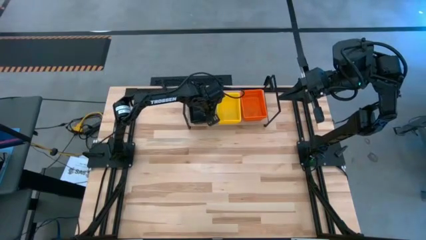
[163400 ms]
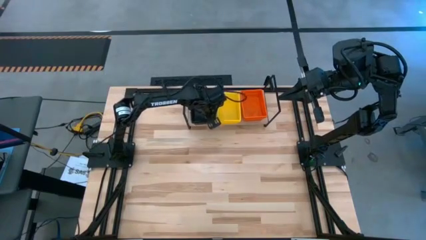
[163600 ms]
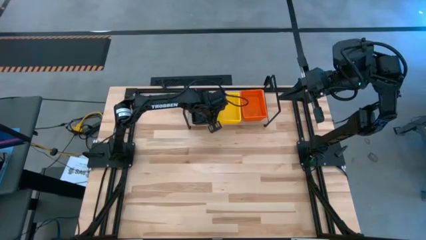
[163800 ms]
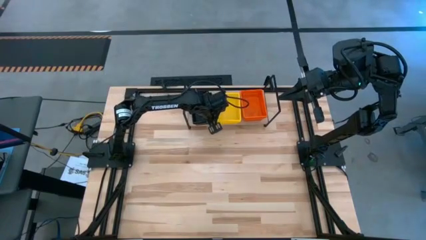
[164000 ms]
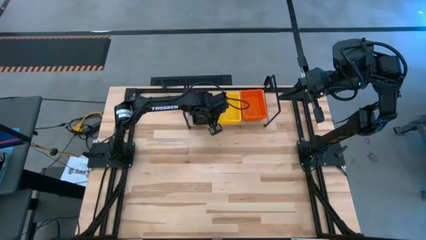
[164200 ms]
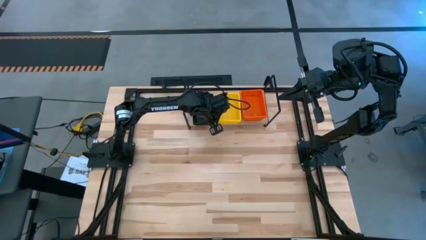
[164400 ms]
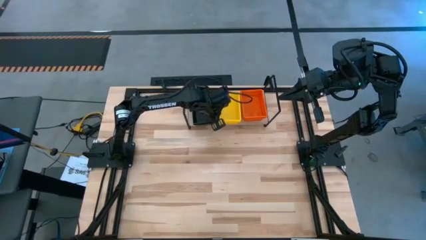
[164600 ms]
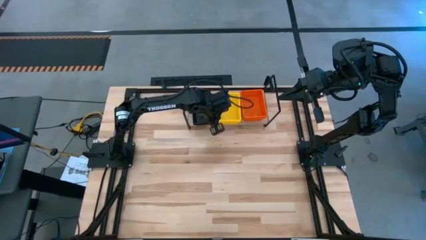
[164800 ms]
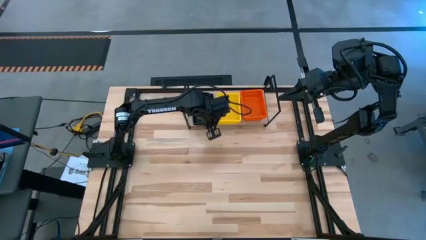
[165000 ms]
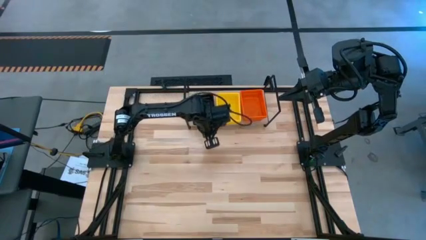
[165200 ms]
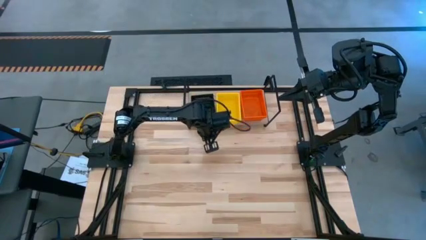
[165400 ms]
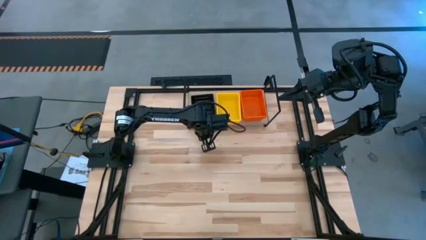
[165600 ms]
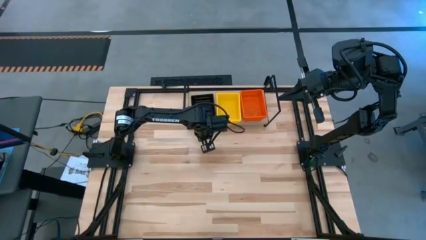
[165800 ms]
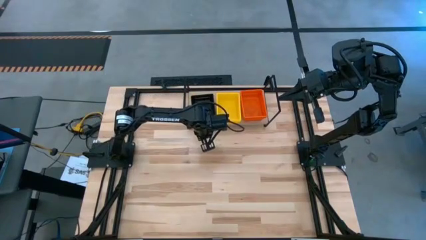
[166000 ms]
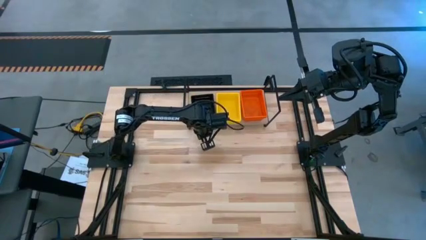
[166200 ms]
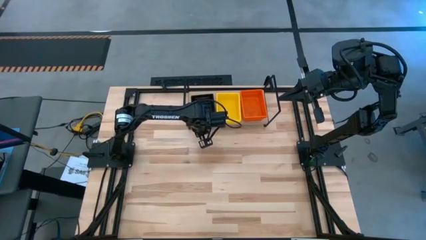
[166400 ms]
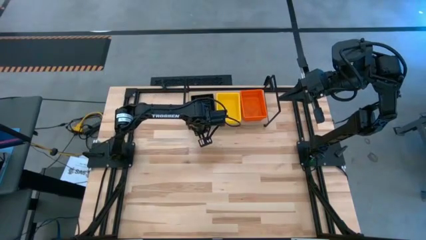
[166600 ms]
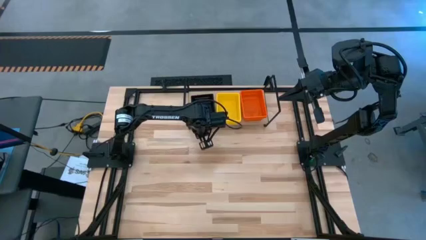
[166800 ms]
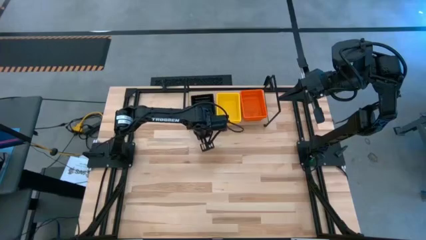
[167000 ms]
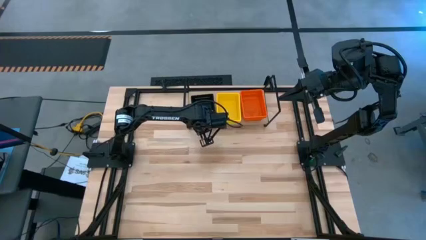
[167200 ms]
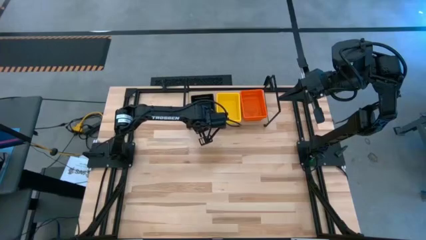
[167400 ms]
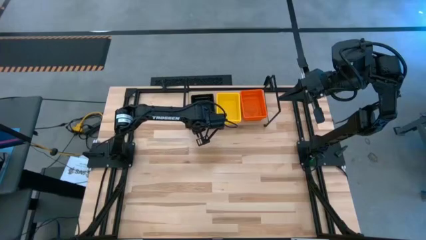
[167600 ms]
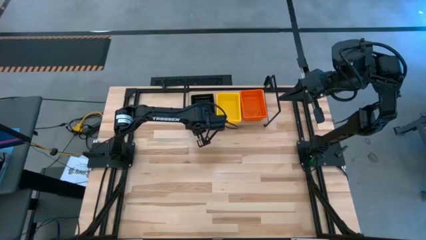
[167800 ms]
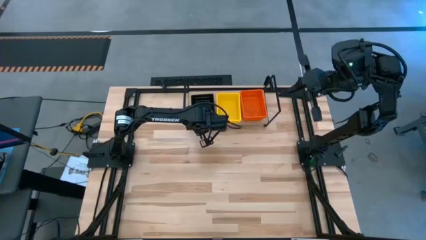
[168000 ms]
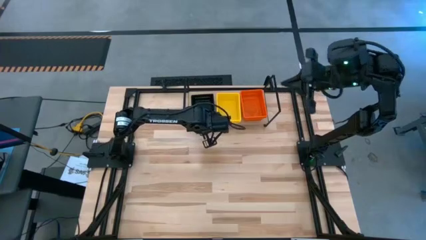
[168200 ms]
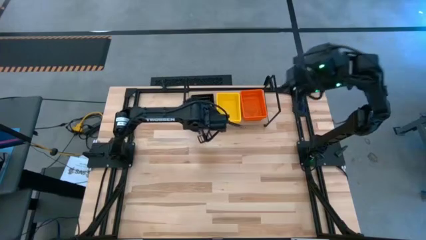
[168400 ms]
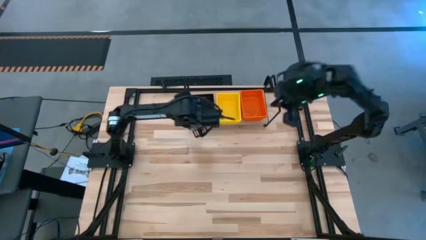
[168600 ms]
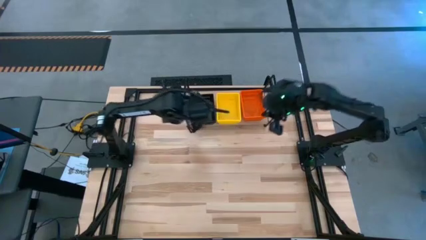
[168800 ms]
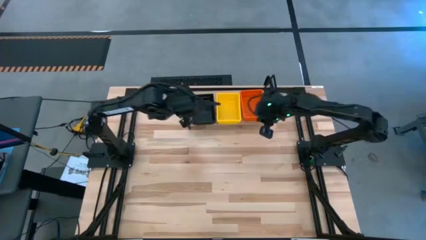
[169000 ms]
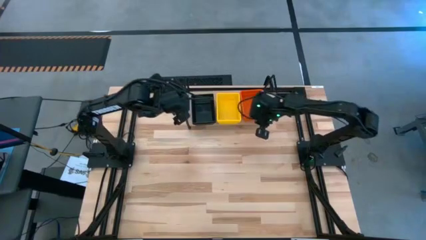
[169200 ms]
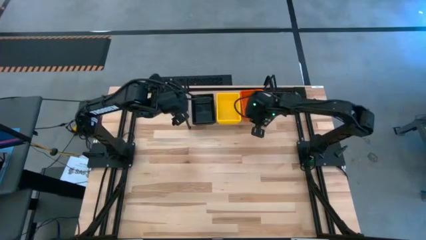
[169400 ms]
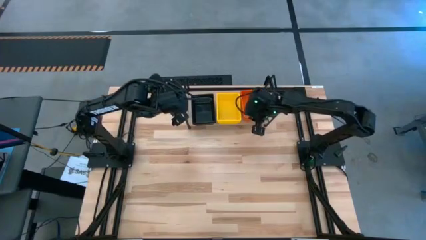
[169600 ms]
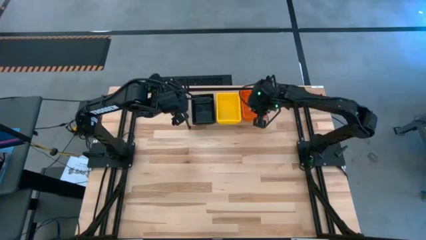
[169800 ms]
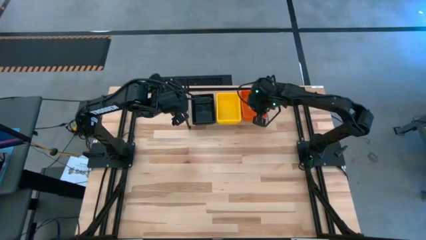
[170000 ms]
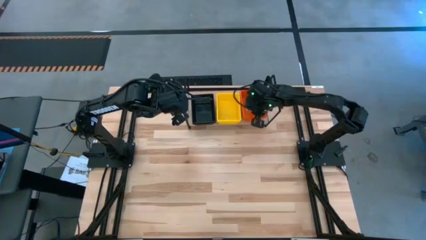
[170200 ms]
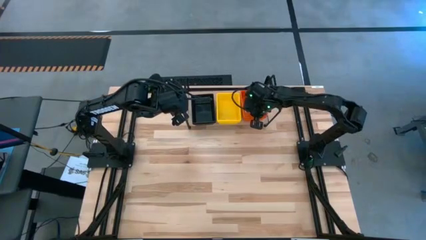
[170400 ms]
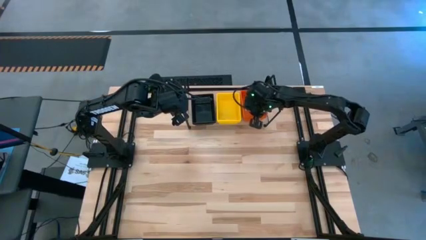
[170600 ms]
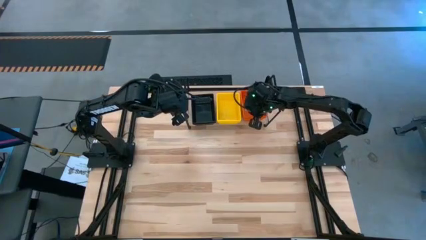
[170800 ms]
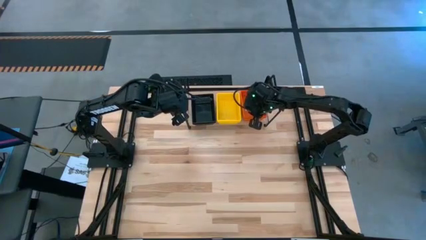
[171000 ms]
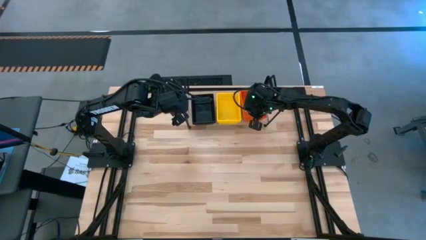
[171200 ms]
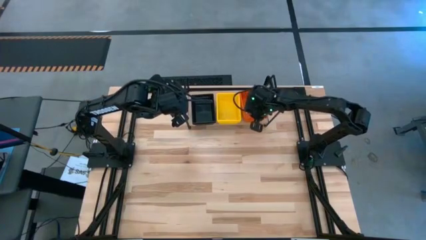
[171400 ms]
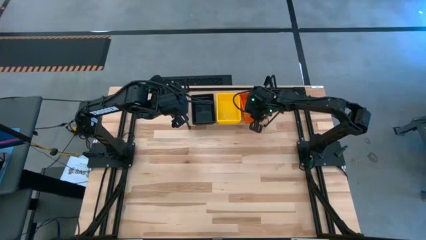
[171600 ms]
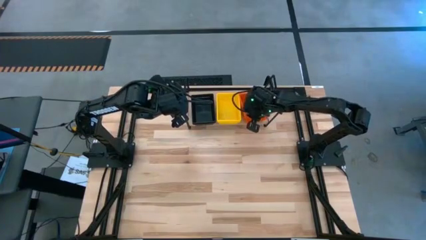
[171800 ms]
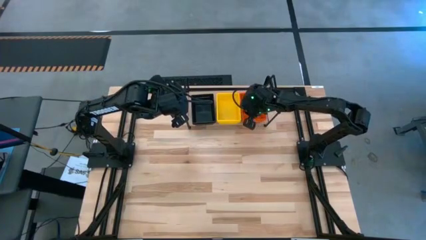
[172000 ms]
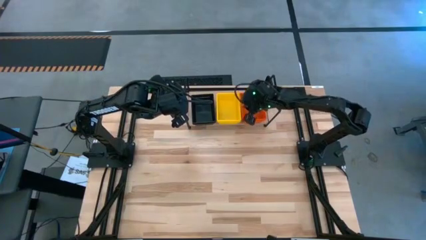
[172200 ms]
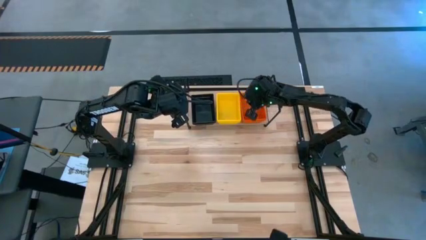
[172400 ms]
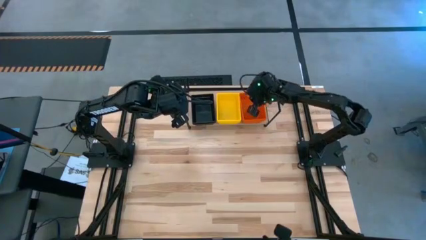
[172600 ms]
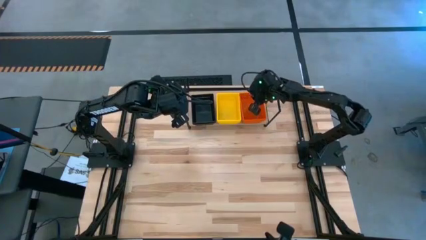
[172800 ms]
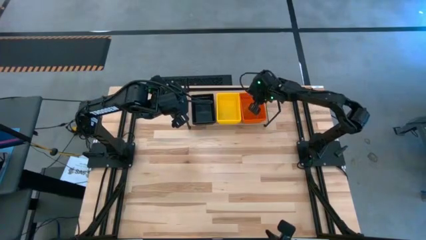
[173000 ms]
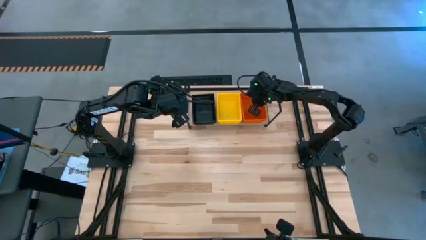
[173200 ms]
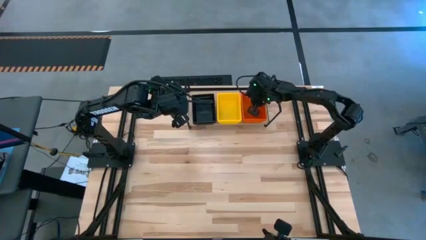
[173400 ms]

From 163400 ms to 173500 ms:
Task: Stack baskets on shelf by color
Adjust all the bins on the shelf

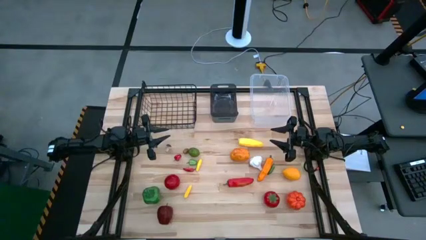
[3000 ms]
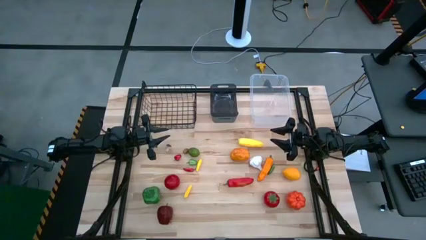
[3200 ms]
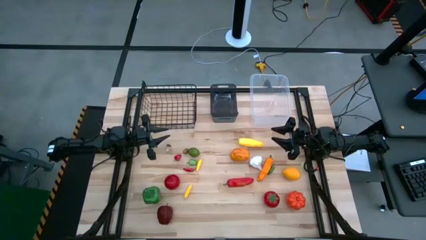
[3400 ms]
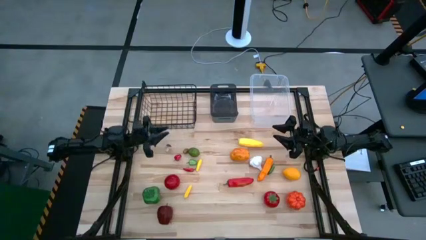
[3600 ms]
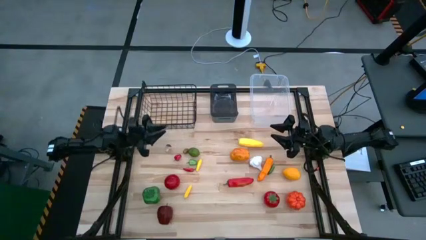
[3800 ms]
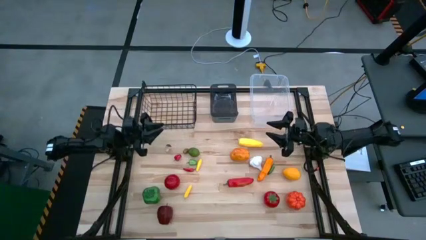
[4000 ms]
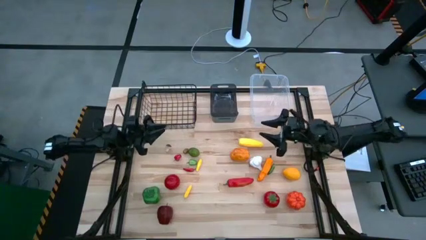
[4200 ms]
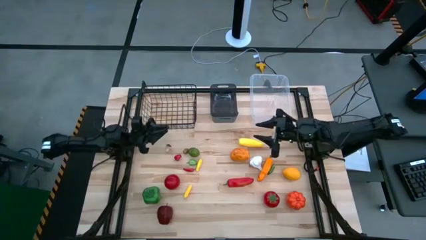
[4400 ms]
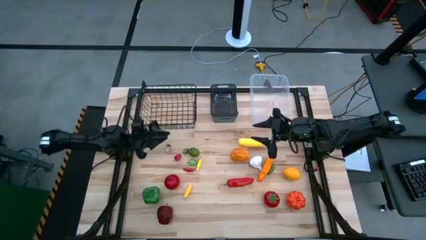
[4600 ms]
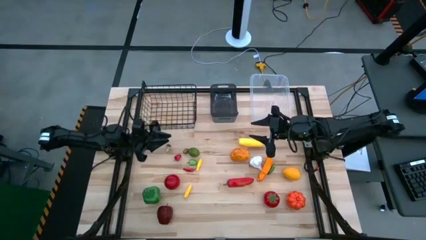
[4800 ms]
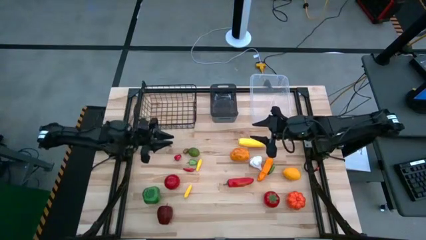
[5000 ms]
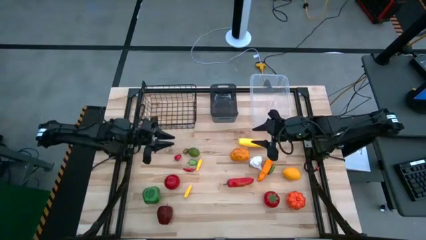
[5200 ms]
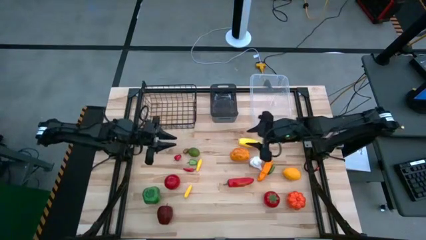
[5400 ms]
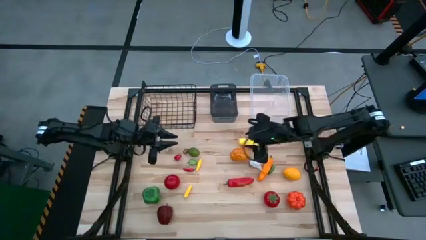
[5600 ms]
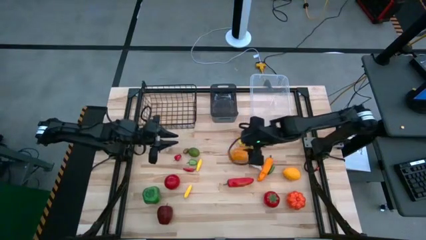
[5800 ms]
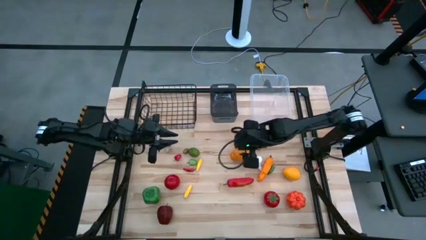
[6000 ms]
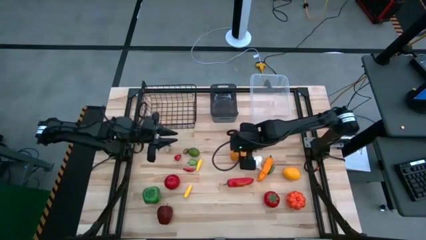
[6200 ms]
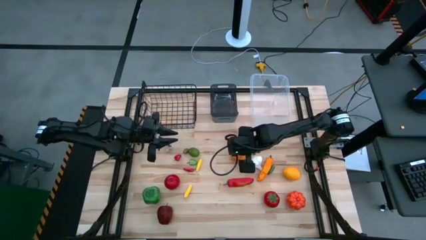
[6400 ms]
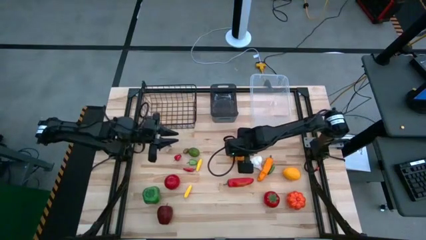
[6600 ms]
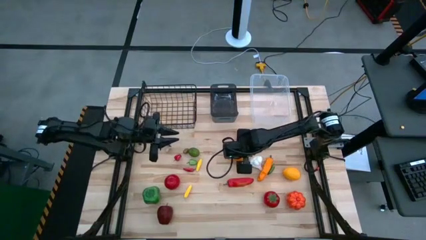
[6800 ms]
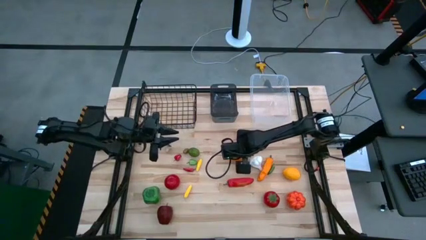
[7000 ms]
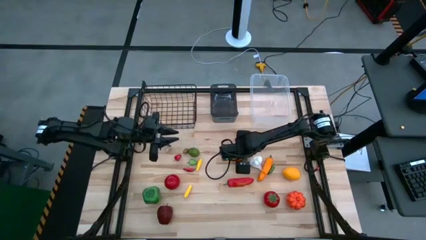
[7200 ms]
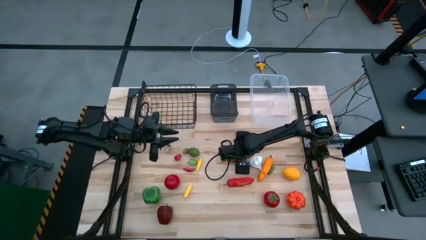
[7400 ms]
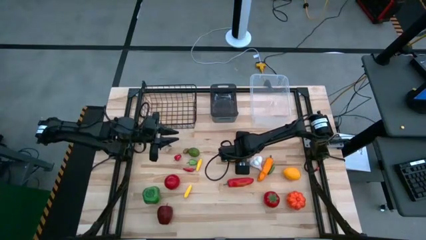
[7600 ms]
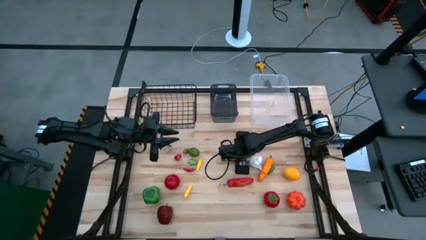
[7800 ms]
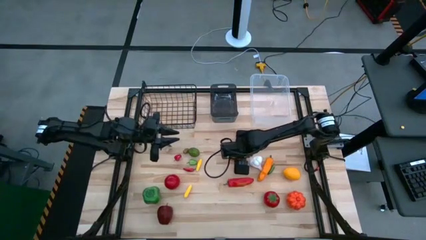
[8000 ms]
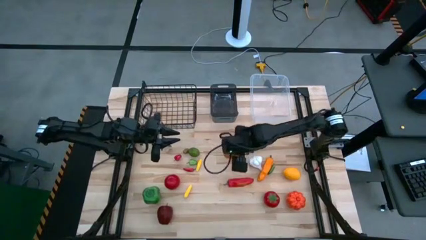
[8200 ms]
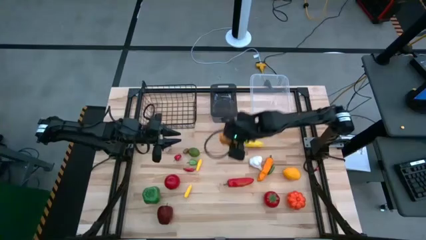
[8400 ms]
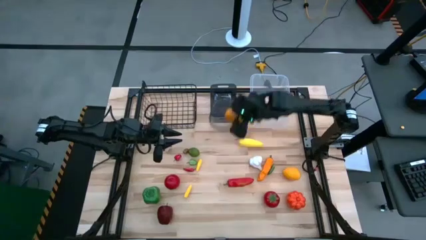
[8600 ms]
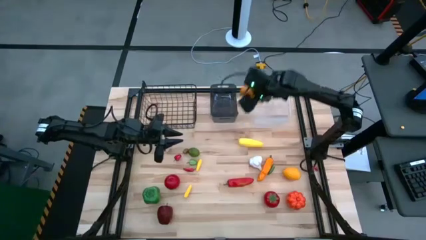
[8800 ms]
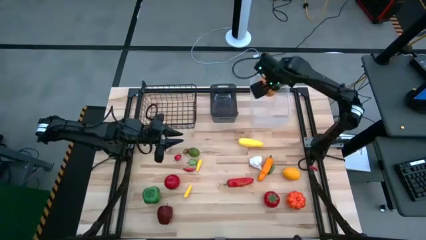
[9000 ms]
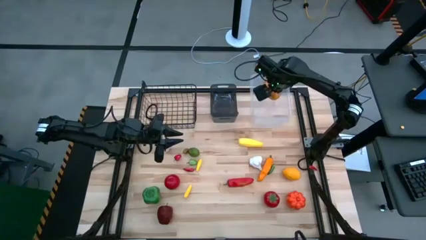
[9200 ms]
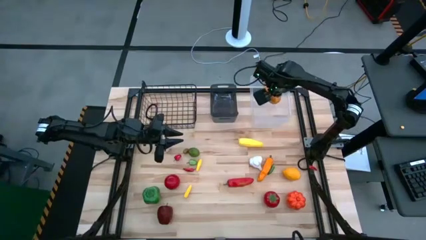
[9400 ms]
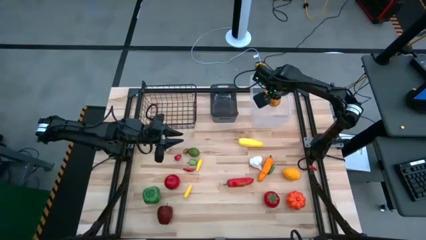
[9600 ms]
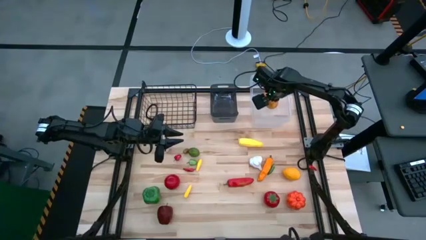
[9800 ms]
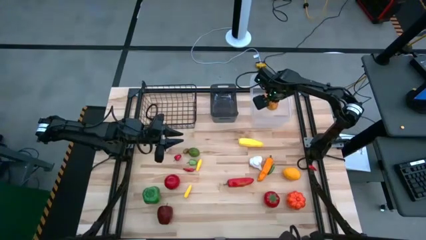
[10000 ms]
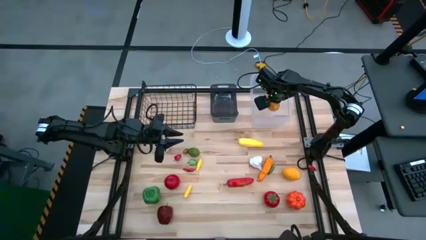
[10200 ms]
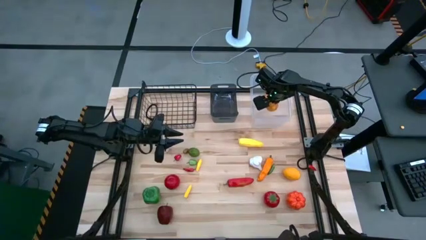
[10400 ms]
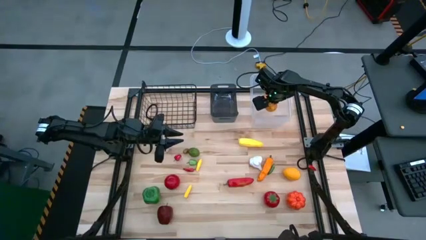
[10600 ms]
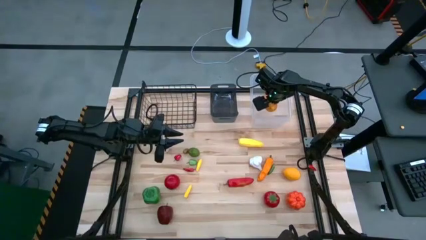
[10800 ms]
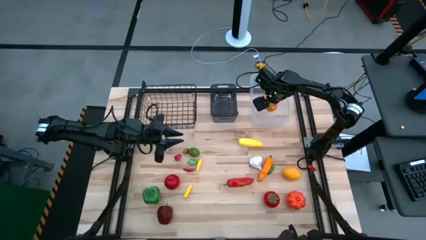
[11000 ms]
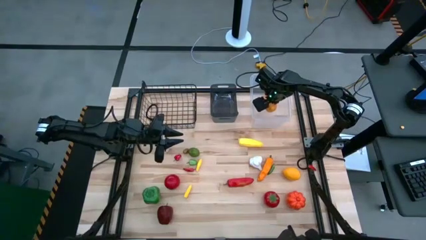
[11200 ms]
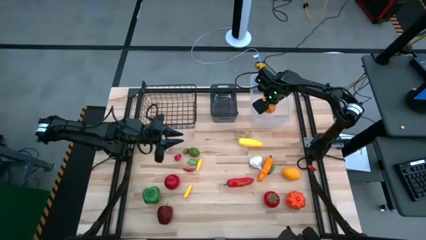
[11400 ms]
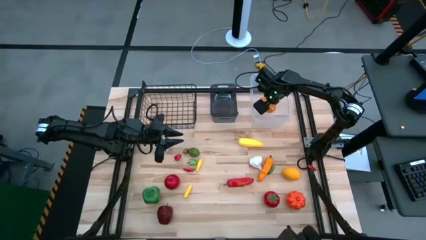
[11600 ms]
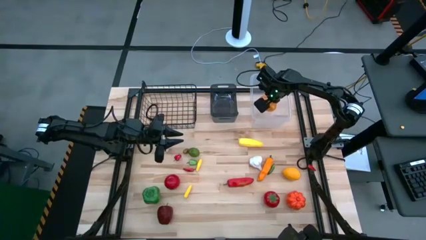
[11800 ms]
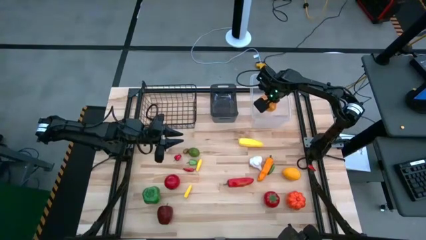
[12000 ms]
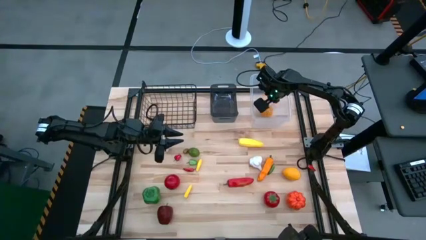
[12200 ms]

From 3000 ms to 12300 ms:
Task: Sort produce into baskets
Put the potato into the transparent bin
